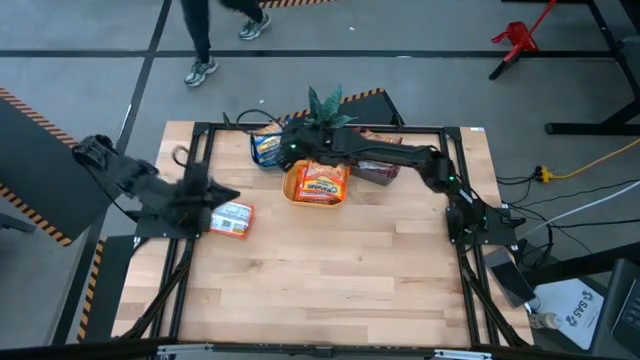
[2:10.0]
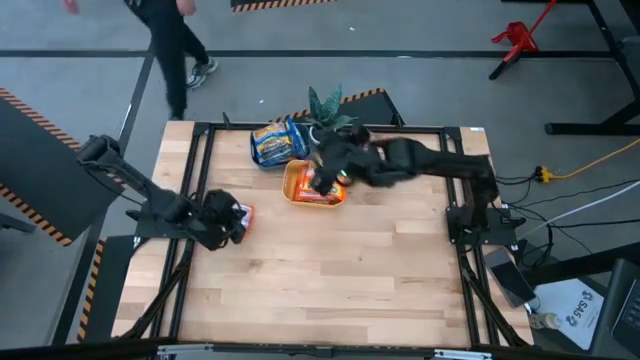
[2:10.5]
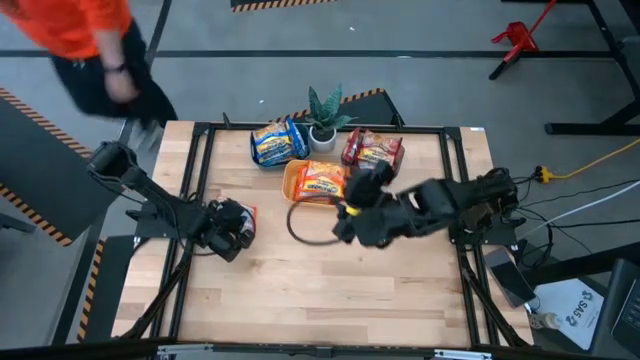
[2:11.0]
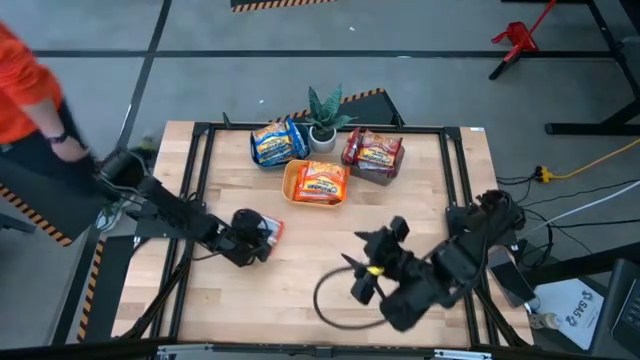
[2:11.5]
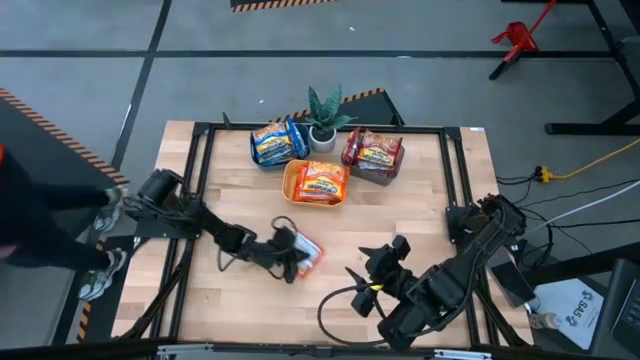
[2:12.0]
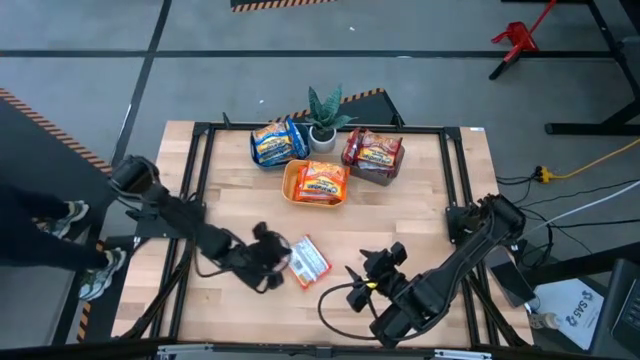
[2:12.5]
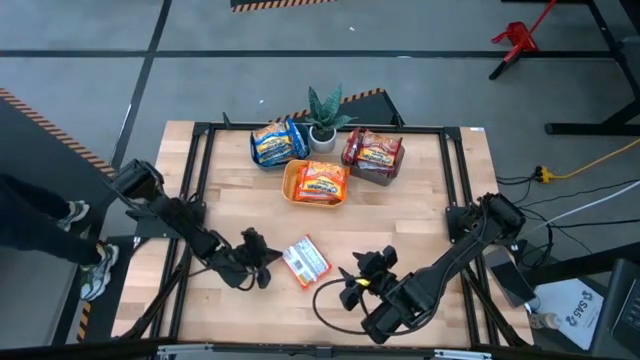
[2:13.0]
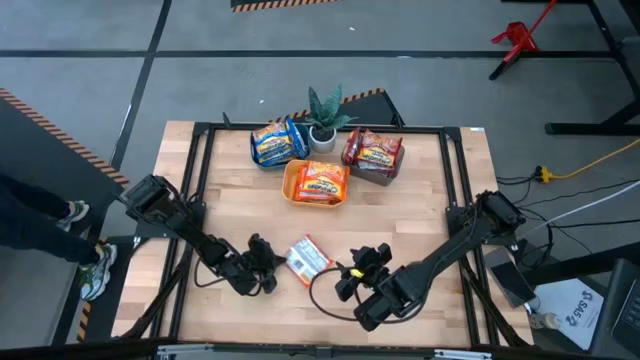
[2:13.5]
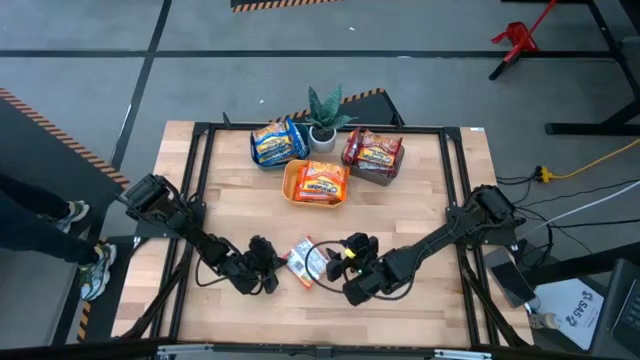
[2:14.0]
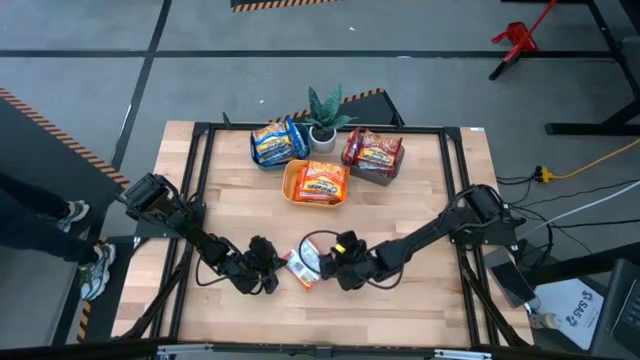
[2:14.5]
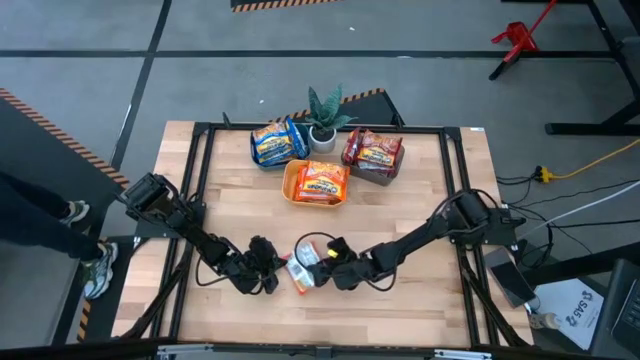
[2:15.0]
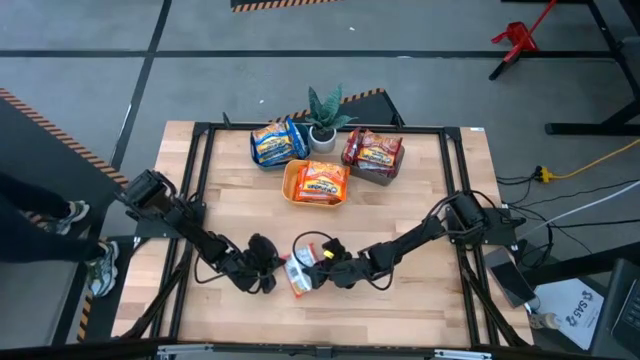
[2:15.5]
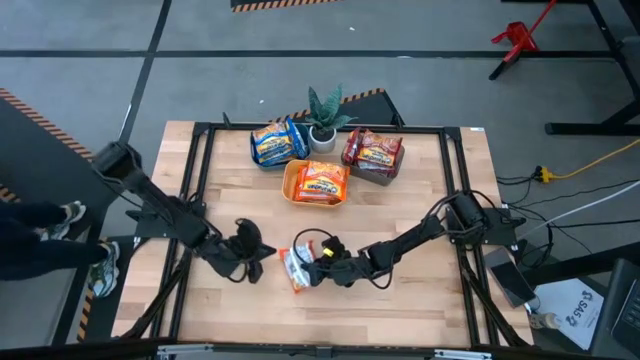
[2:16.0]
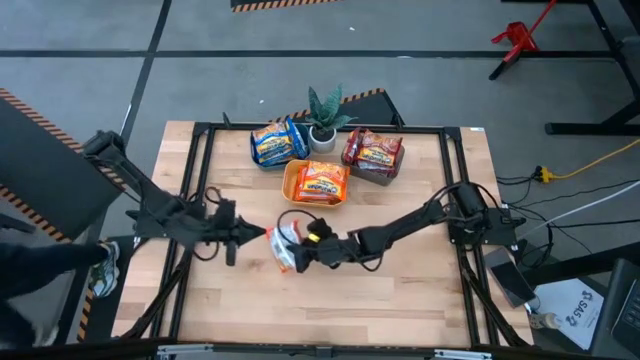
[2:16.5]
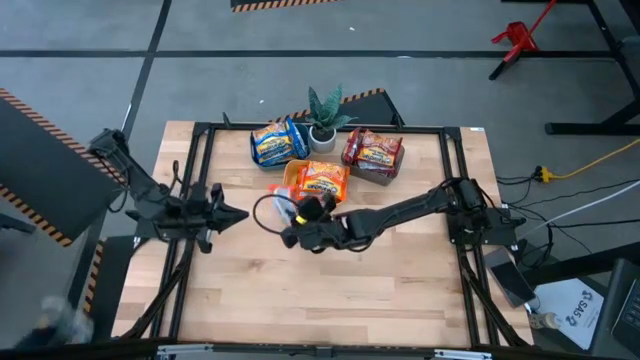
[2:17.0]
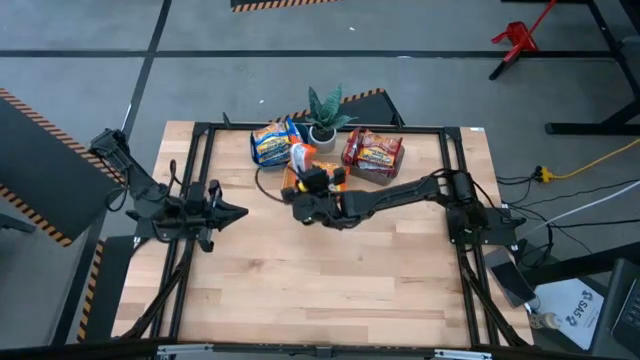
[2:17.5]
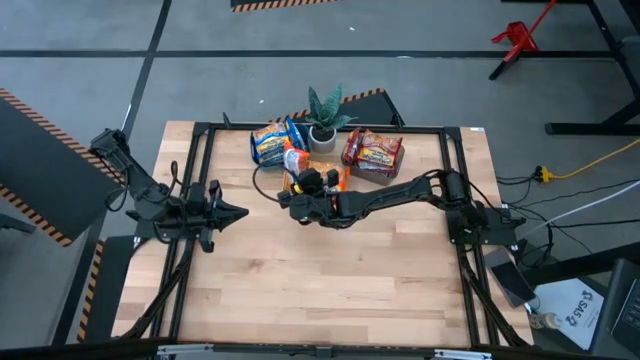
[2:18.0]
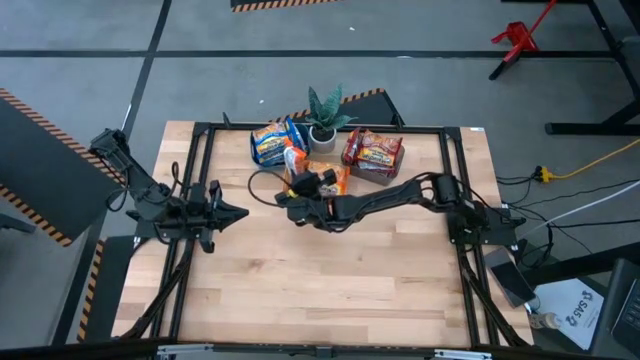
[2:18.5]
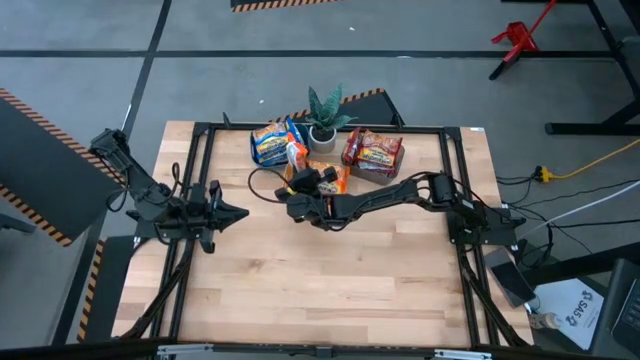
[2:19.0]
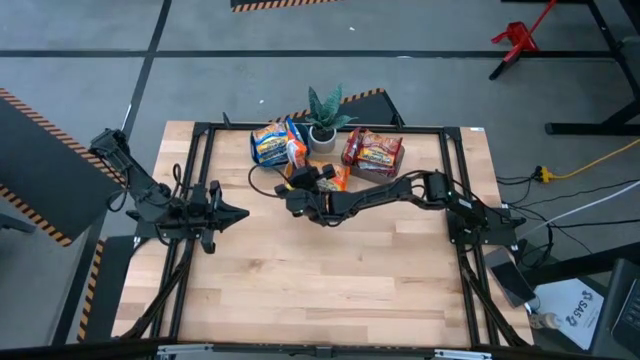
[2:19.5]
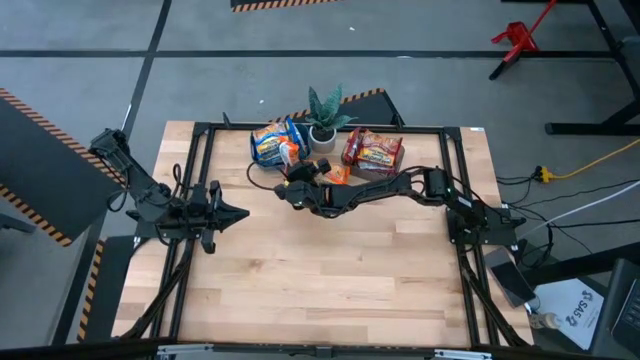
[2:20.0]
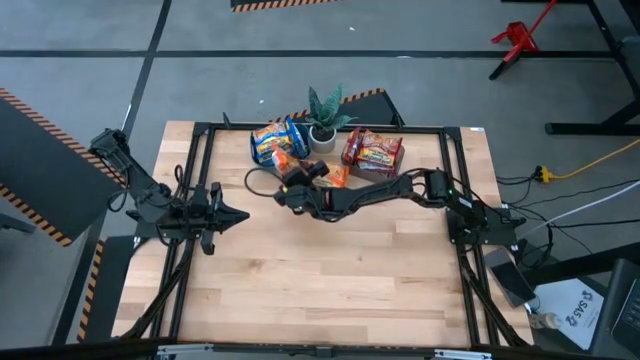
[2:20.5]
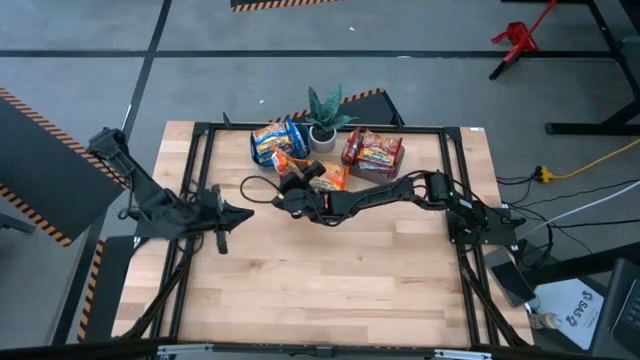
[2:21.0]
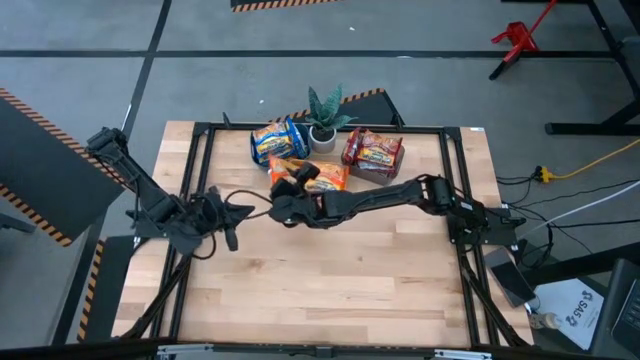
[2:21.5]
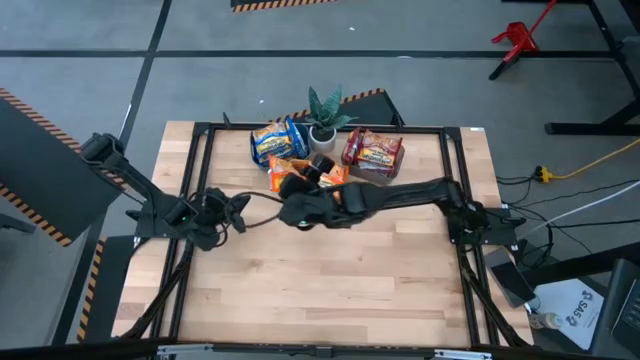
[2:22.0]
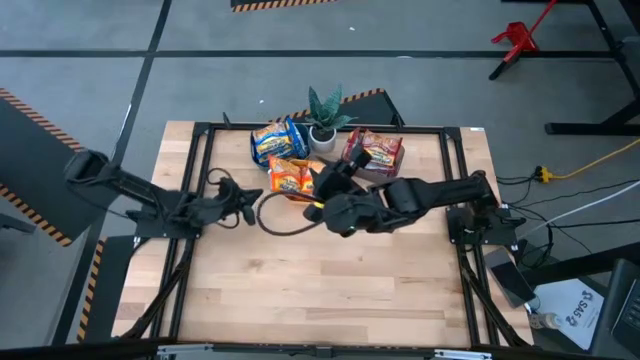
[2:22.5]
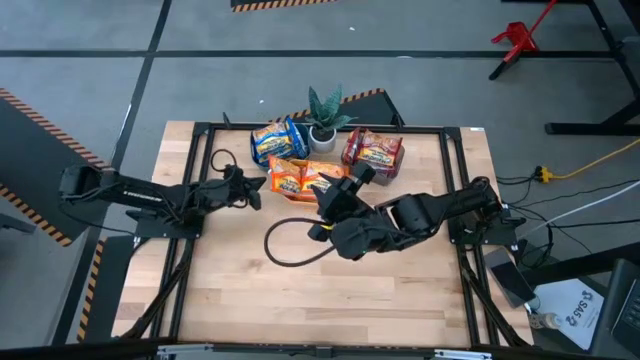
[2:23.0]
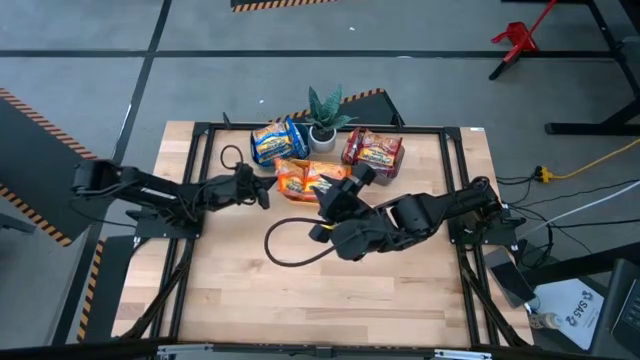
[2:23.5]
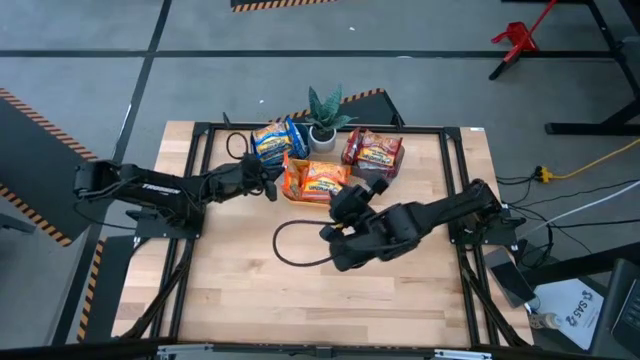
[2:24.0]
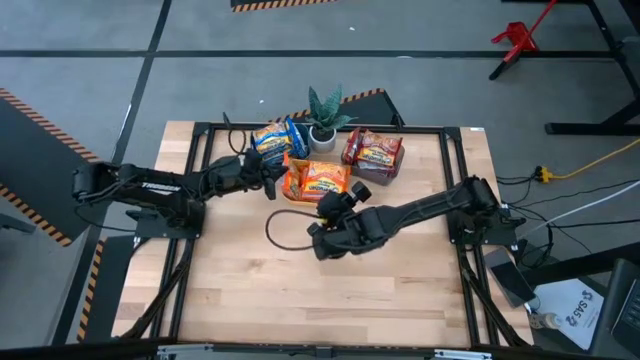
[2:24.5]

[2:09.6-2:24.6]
Task: Sort Maruchan noodles
Put the orange noodle pack into the yellow bin

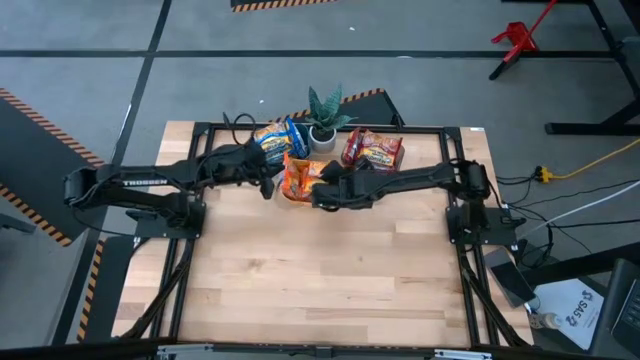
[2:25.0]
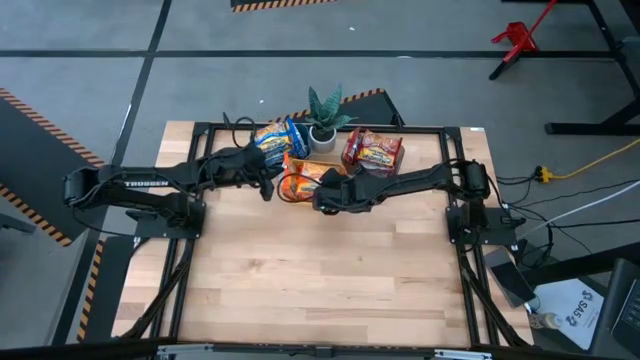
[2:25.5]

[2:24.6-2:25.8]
Adjust the orange noodle in the yellow bin

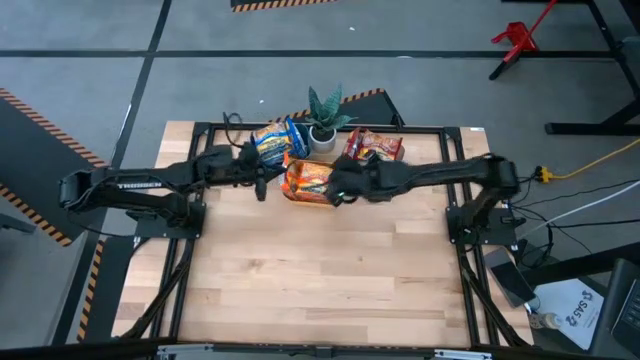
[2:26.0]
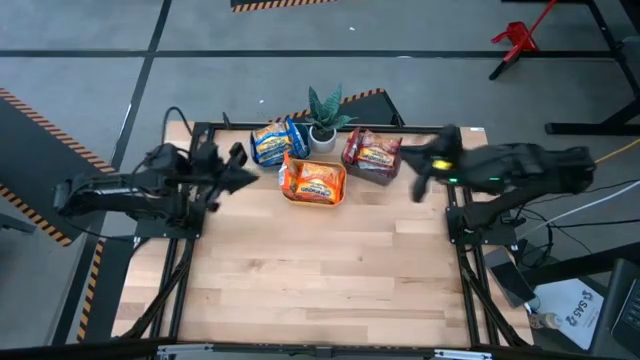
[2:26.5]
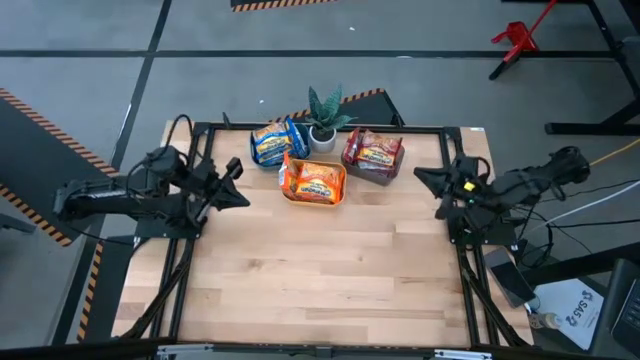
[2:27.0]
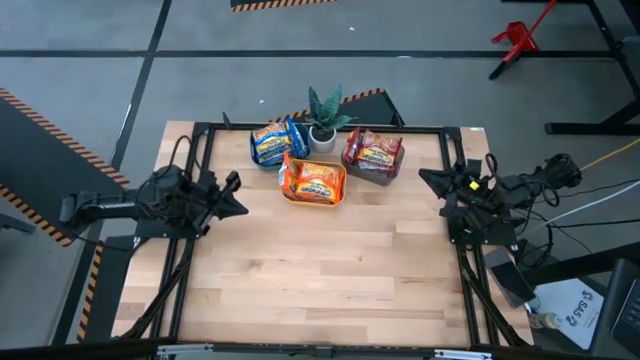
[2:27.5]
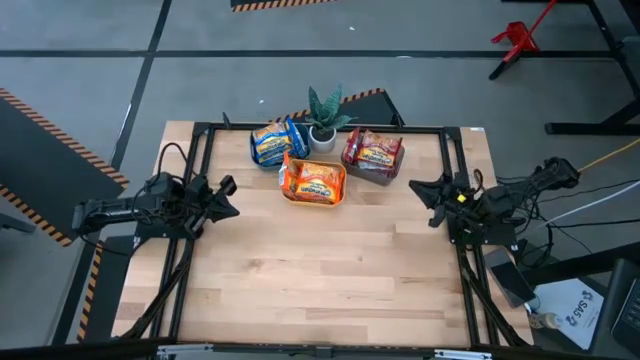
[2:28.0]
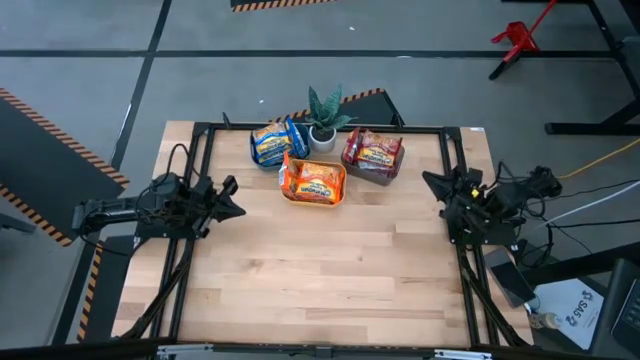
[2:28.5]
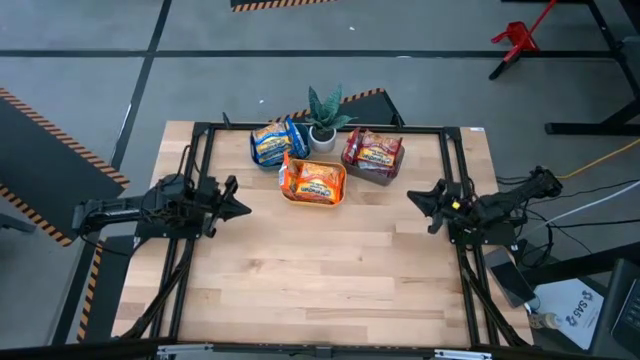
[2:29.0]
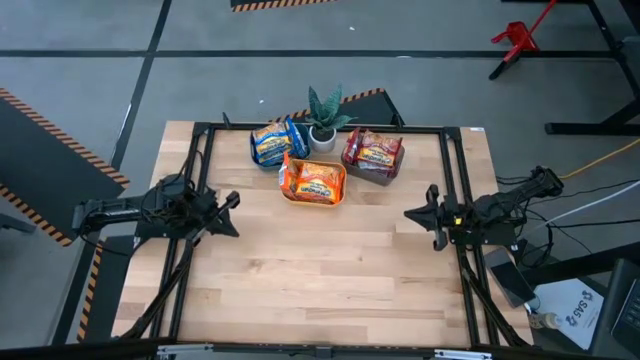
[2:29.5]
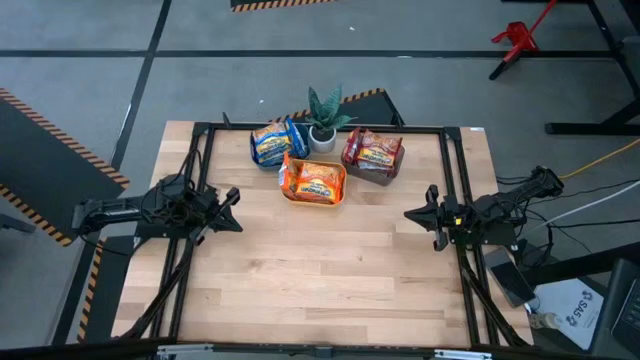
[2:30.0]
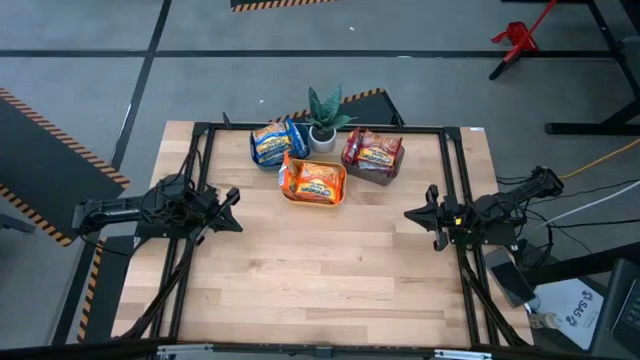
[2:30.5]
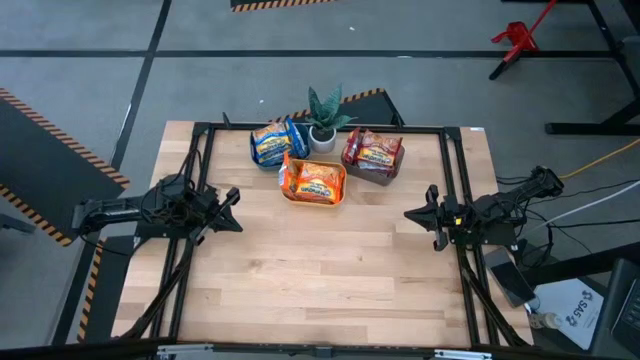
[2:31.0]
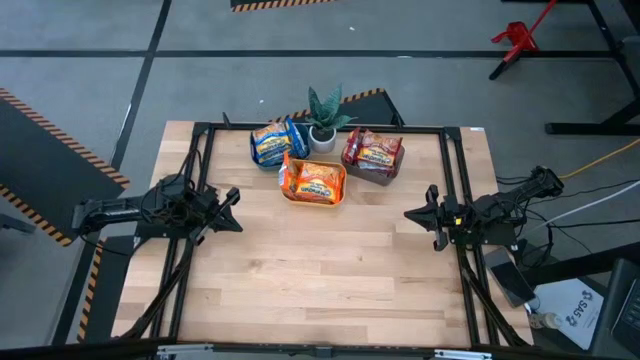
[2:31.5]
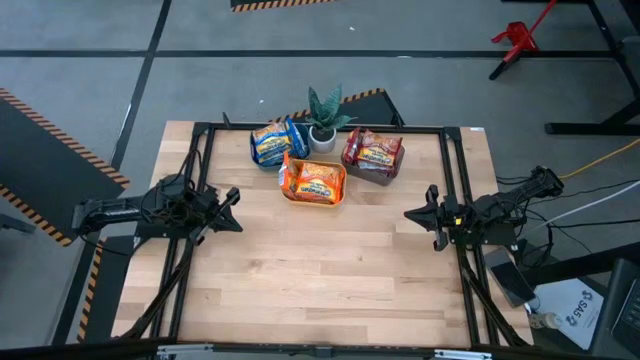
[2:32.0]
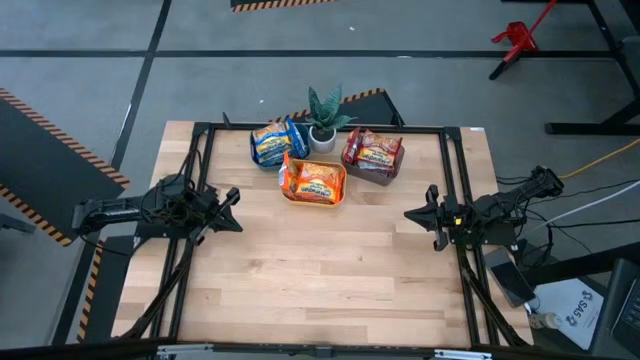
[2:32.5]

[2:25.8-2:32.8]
Return to Home Position
